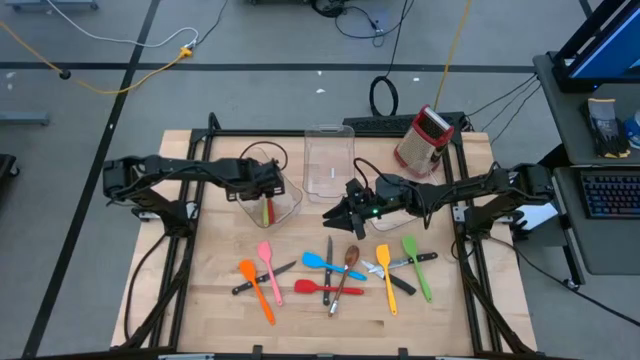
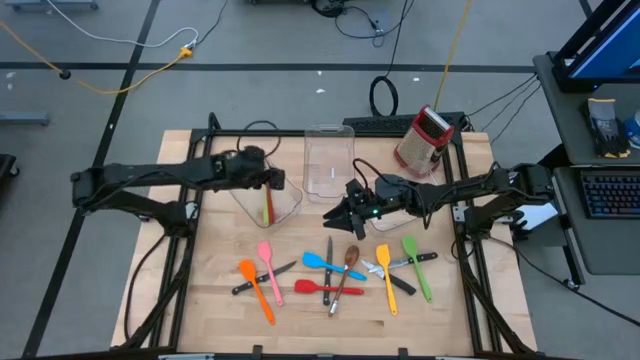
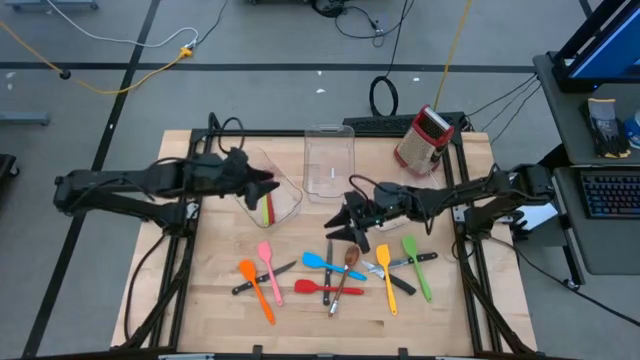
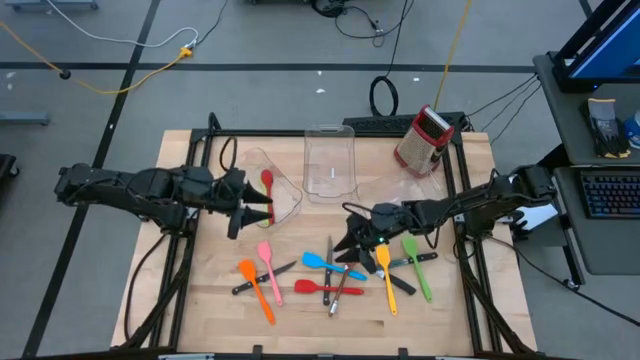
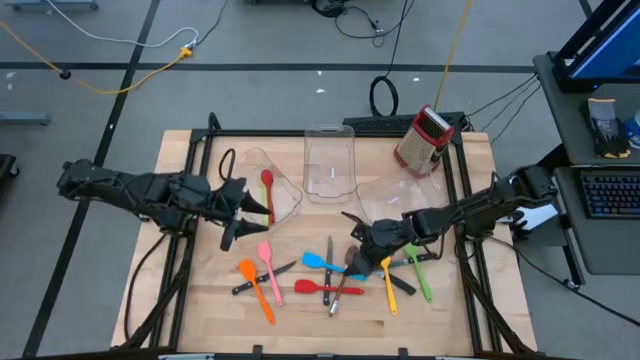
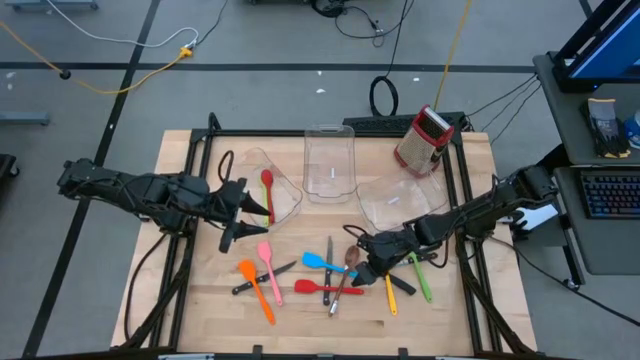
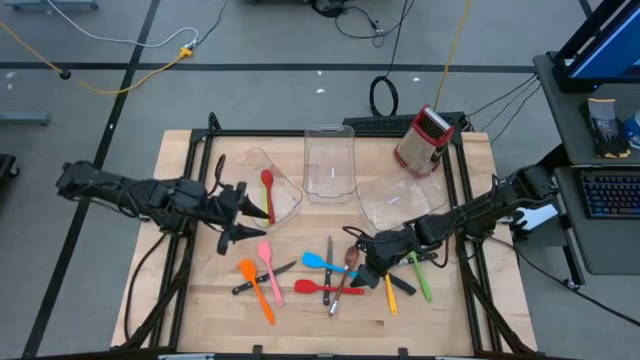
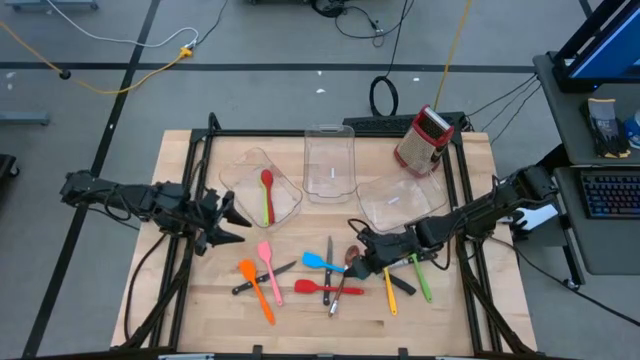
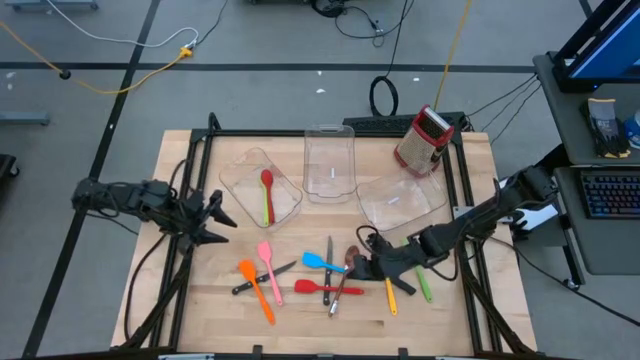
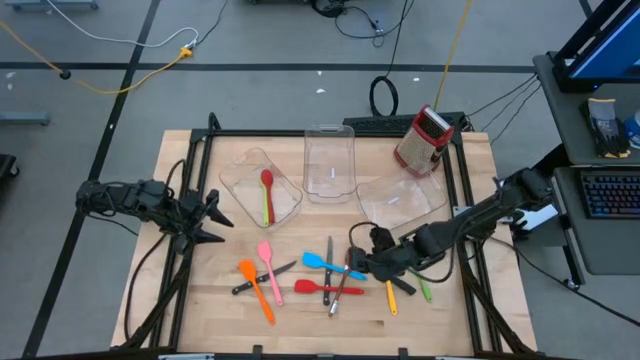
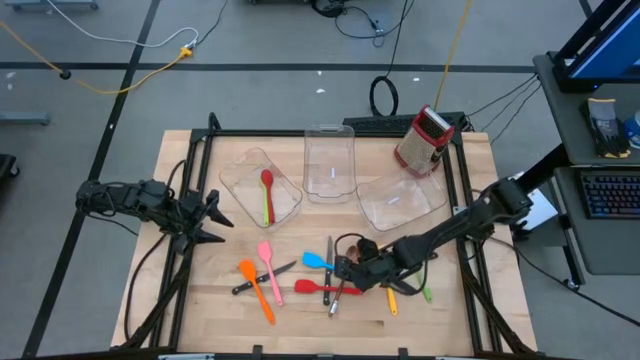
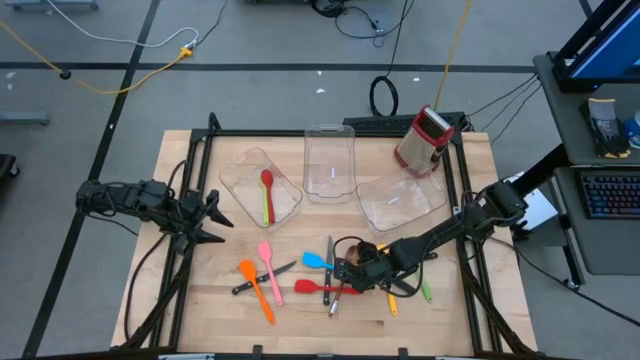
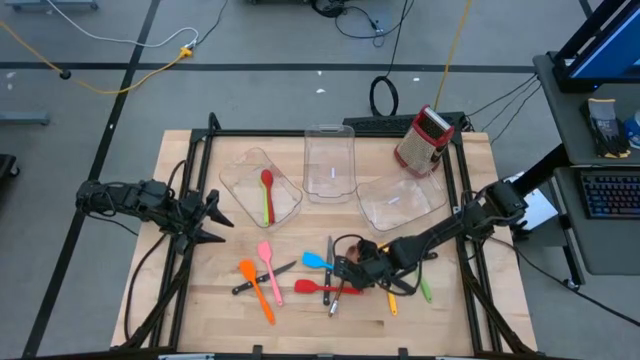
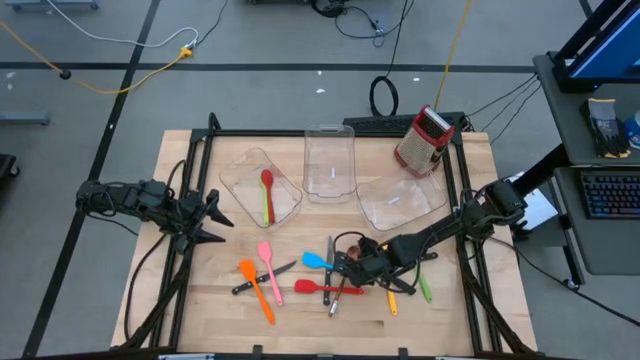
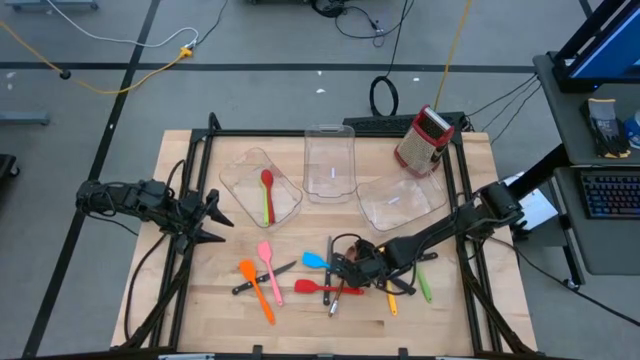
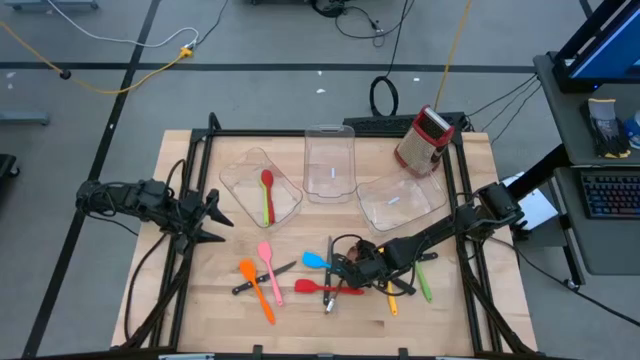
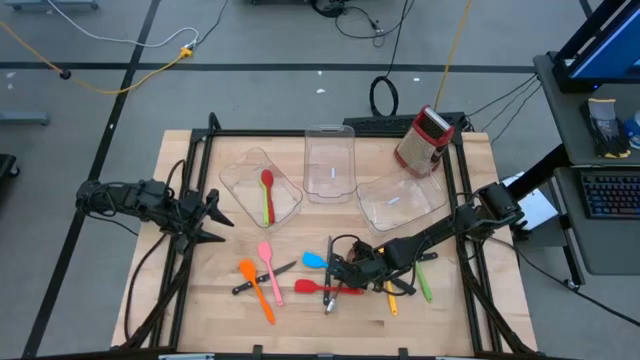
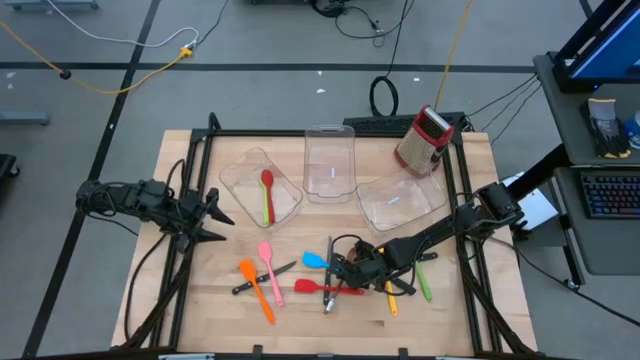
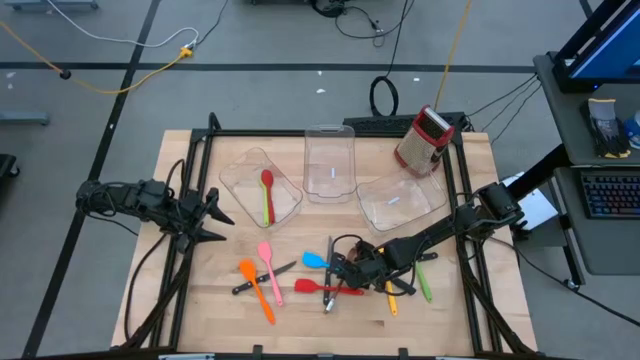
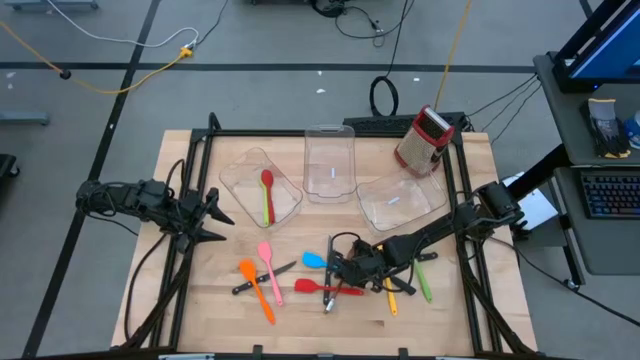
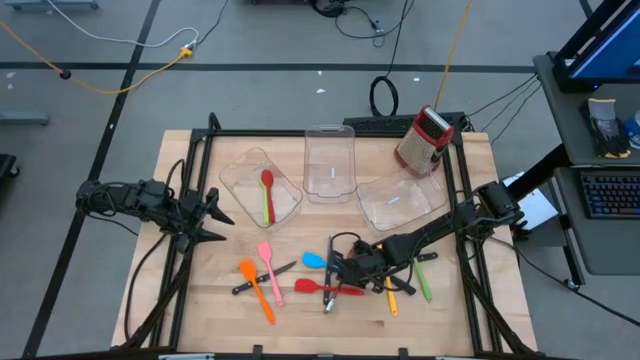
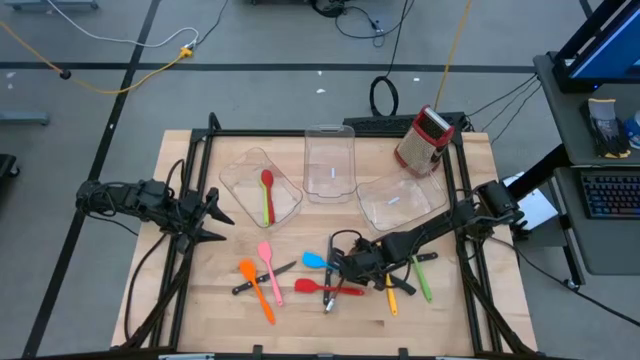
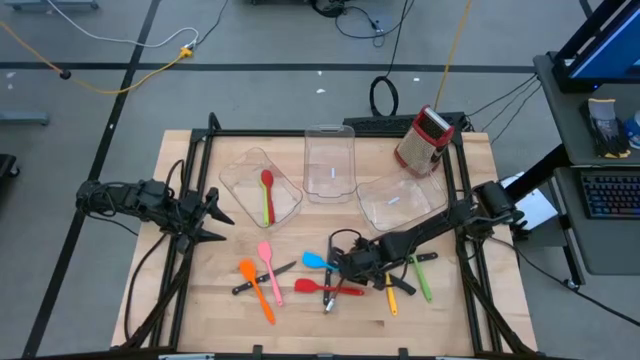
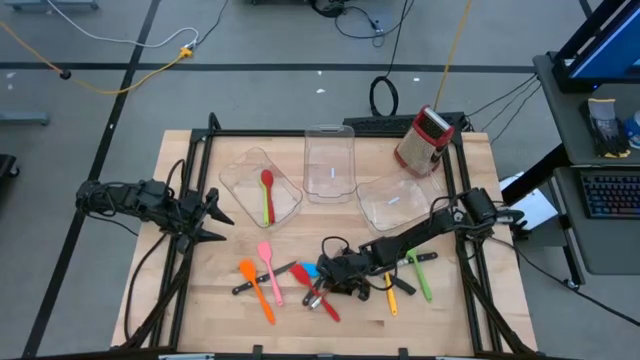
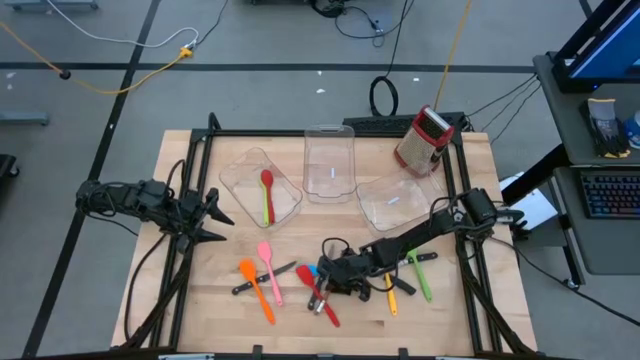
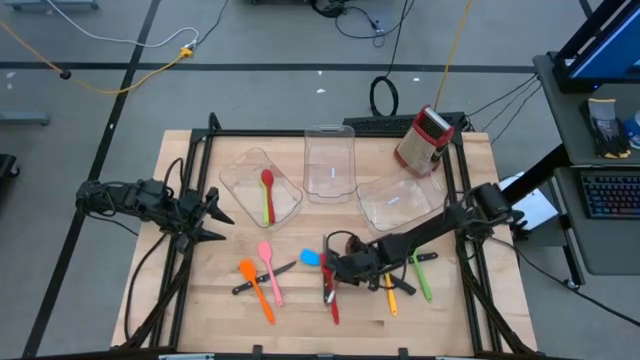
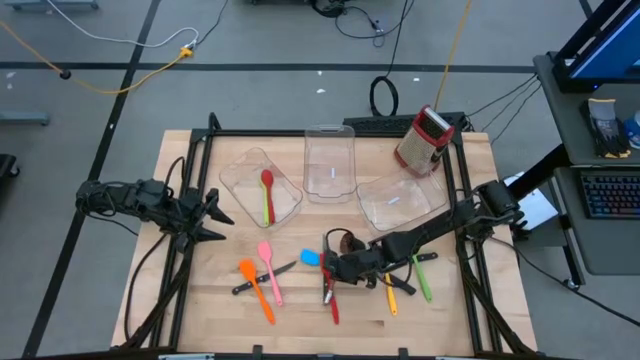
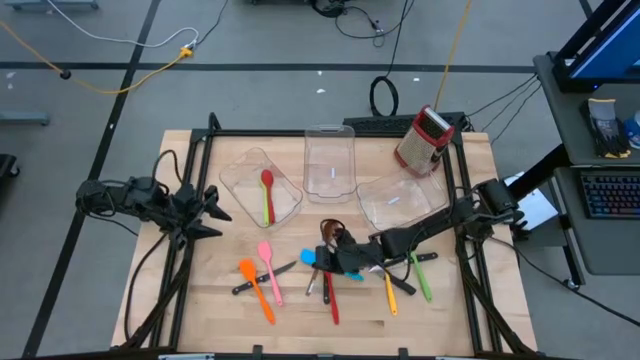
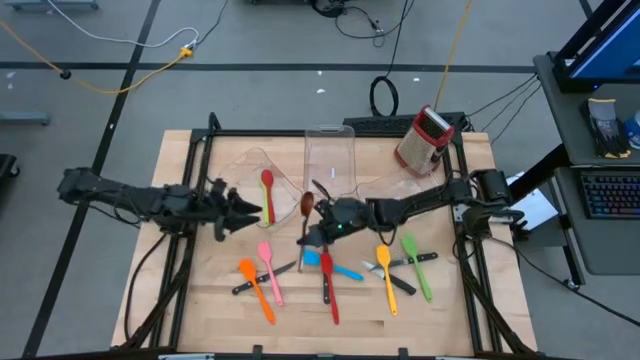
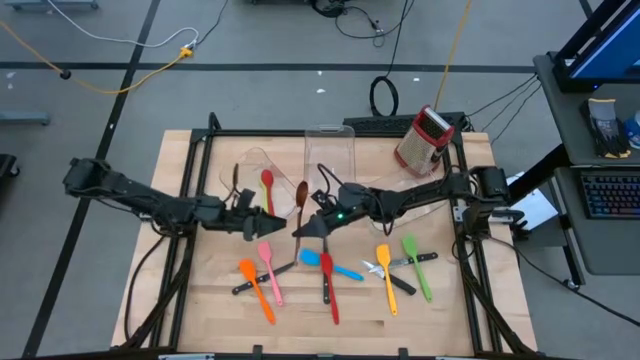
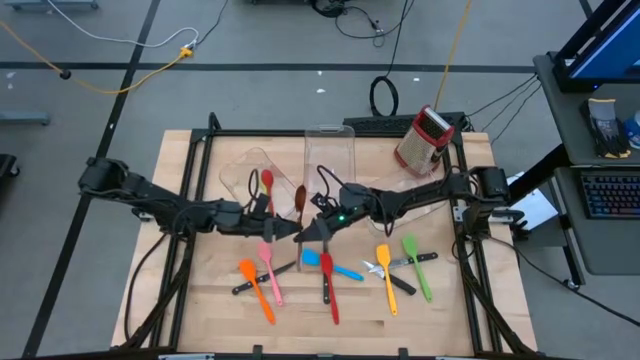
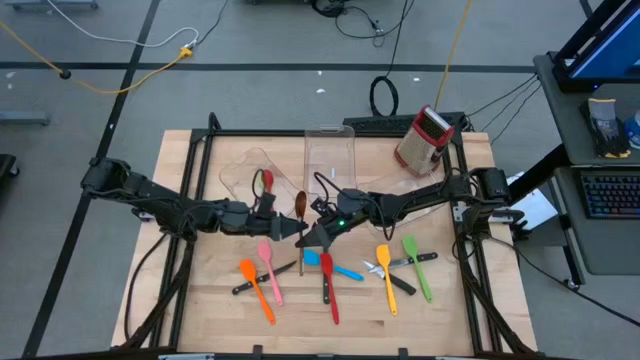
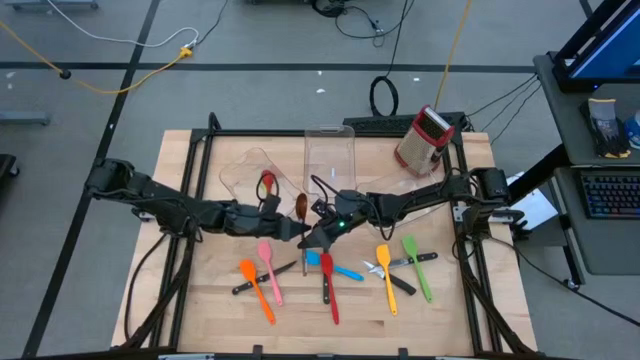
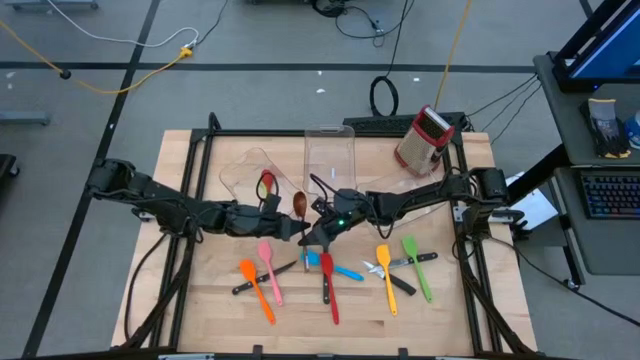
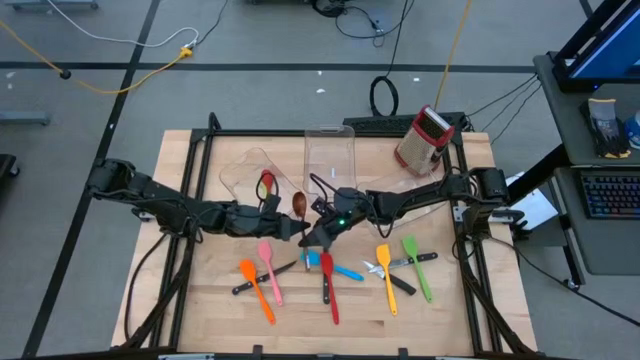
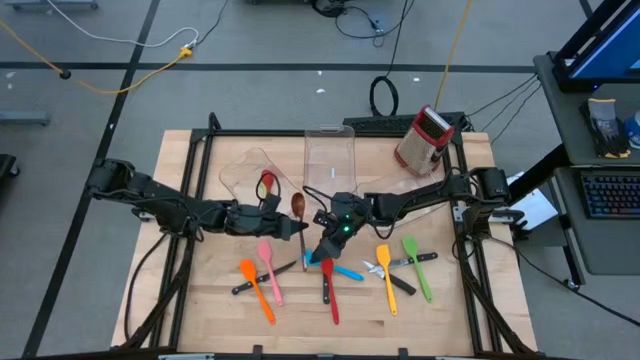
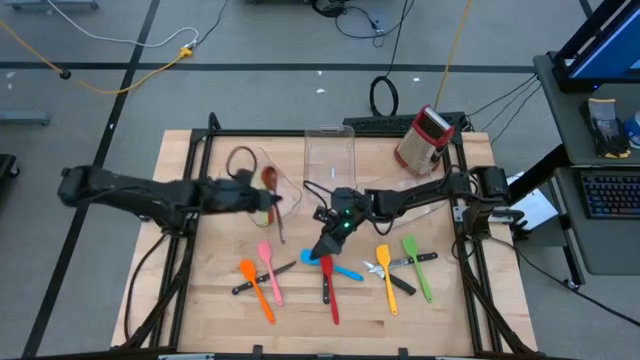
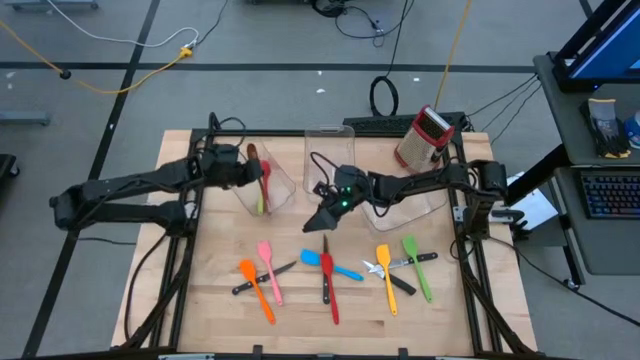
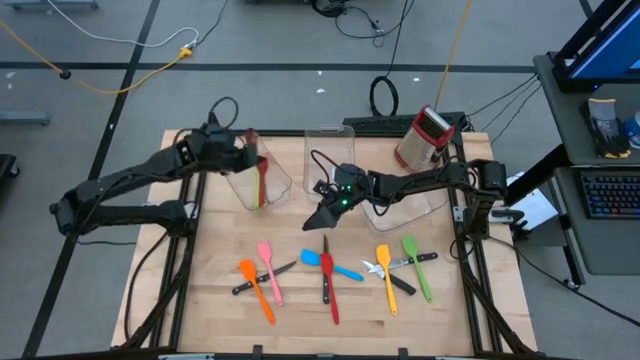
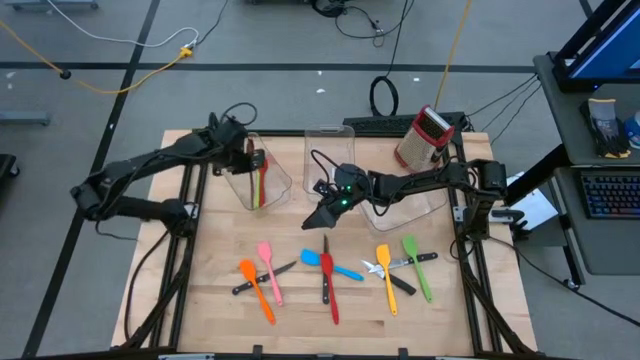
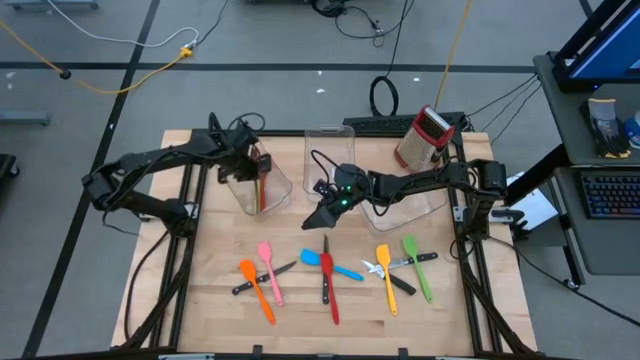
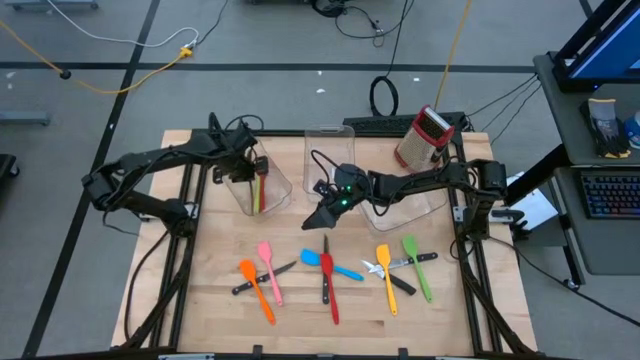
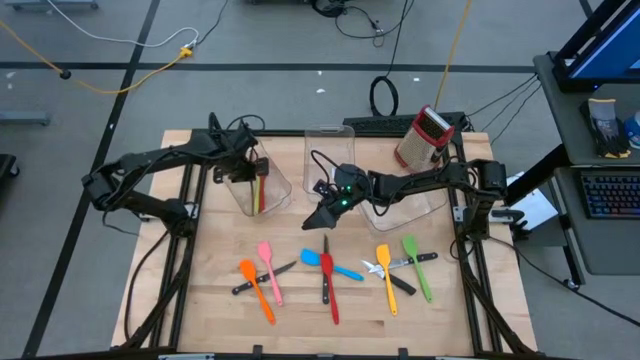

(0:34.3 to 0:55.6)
Task: Pick & Place Kitchen Items
Put the brown serving spoon into the left bin
